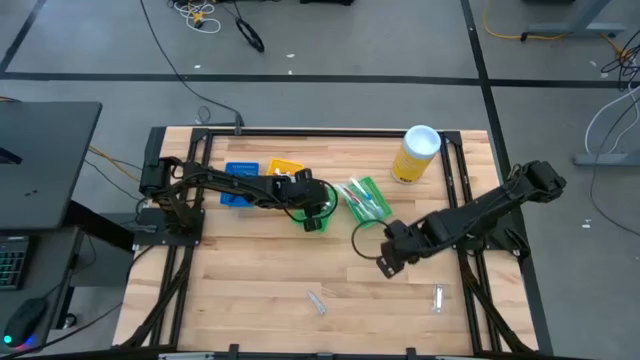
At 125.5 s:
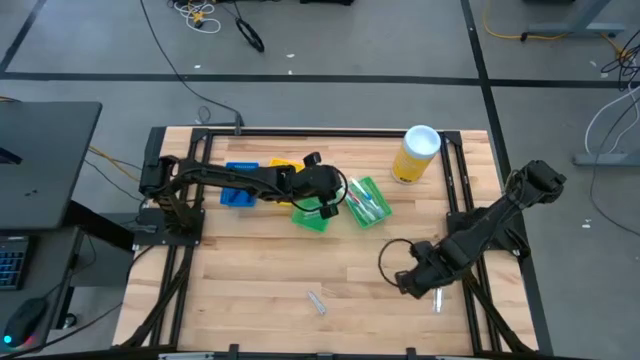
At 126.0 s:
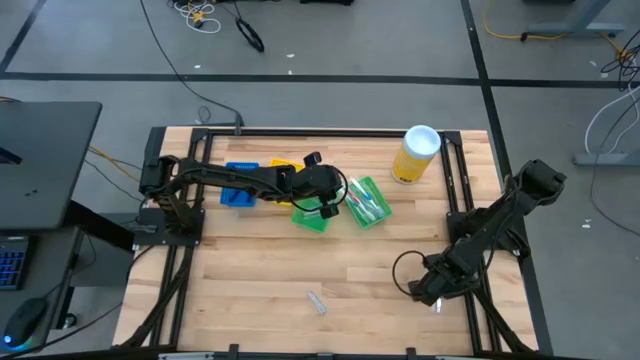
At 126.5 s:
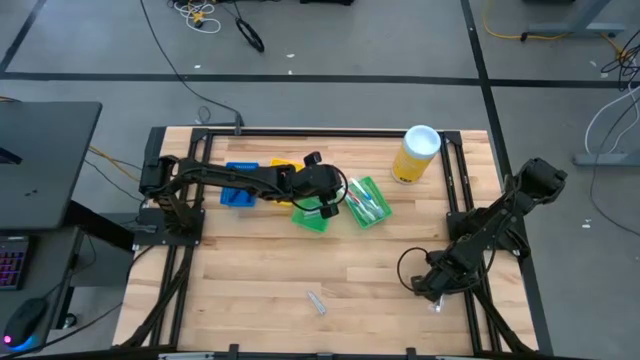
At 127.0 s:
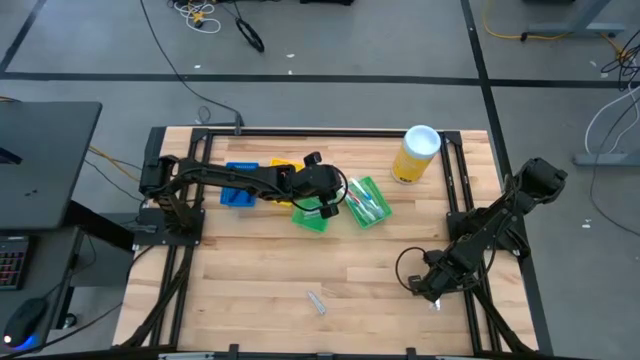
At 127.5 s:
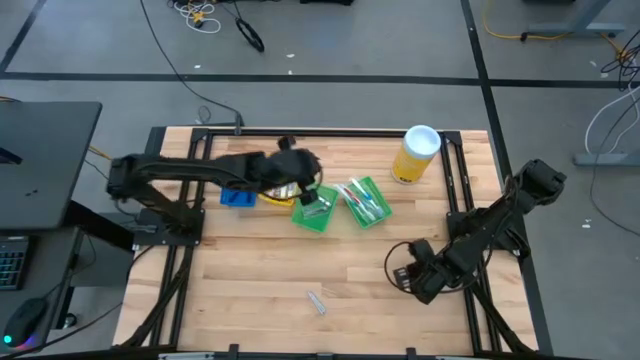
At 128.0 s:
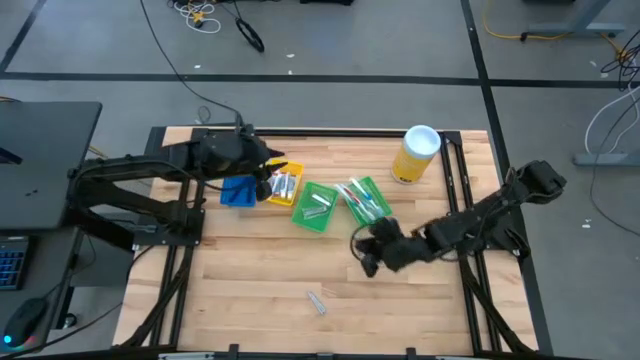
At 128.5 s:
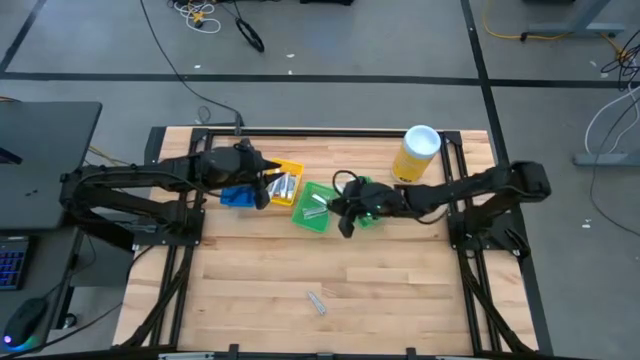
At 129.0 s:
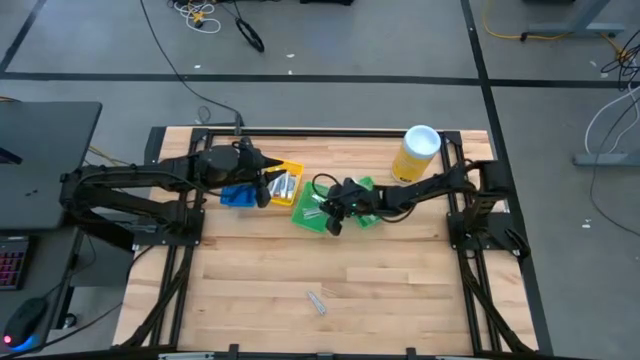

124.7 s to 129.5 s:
Task: Pick & Place Travel size toiletries
Put the silver nail cutter into the left green bin

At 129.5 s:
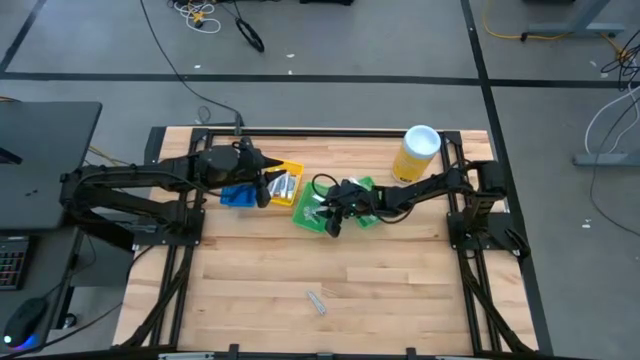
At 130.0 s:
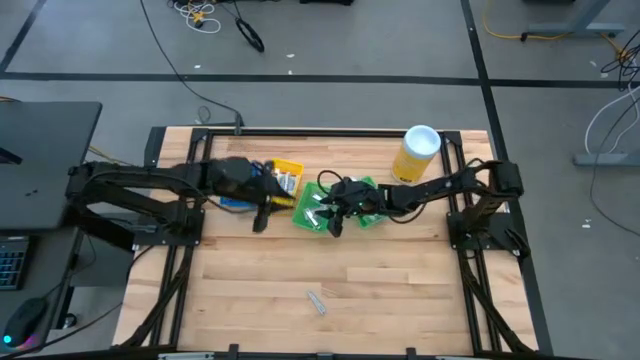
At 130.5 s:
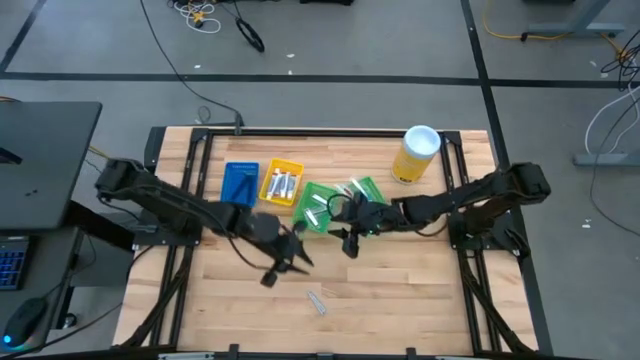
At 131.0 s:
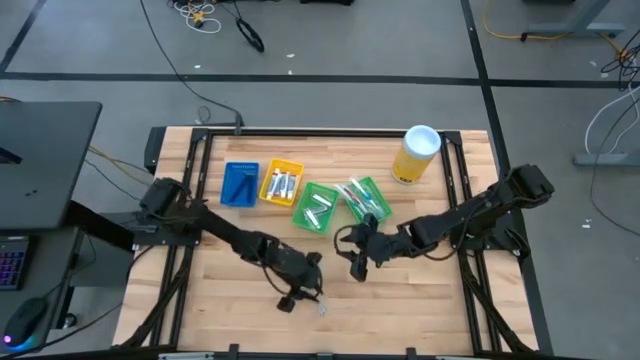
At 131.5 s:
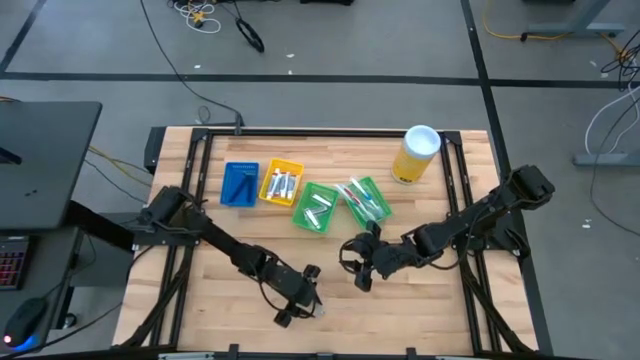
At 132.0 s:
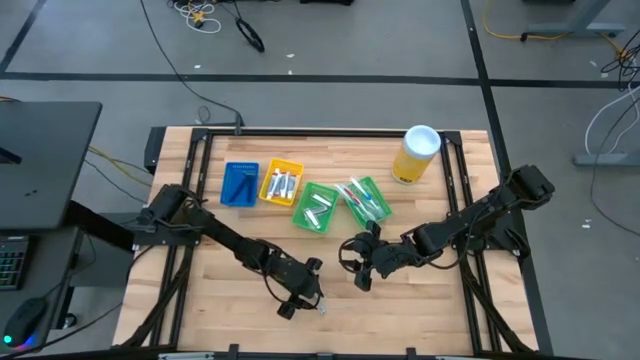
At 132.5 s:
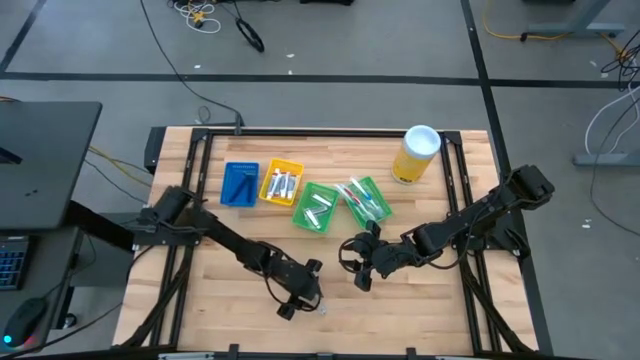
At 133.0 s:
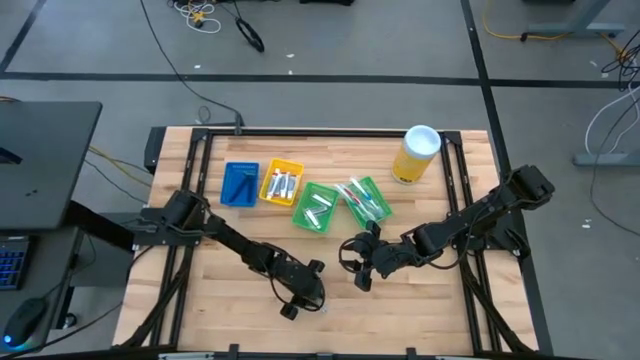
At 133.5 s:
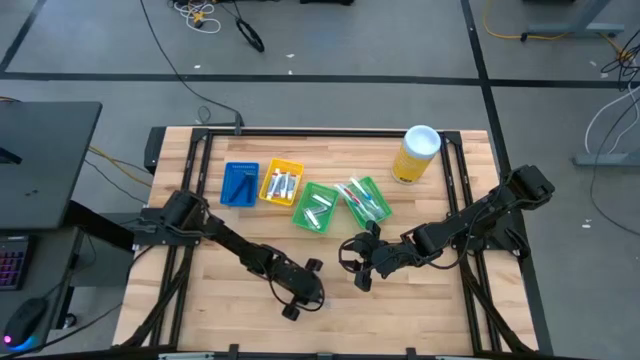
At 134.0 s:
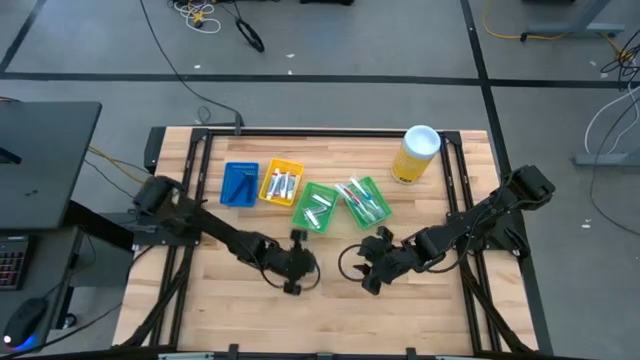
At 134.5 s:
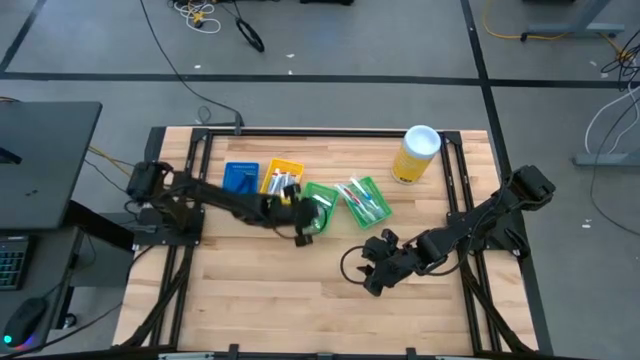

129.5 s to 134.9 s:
Put the silver nail cutter into the left green bin

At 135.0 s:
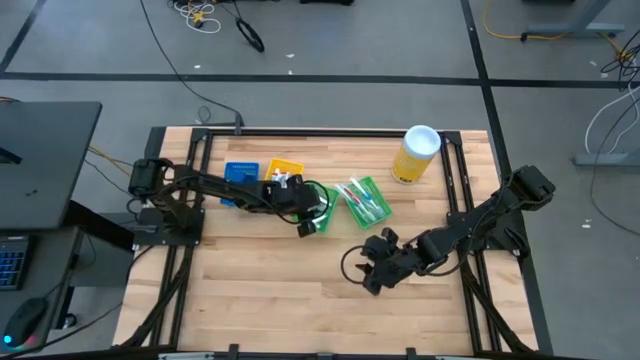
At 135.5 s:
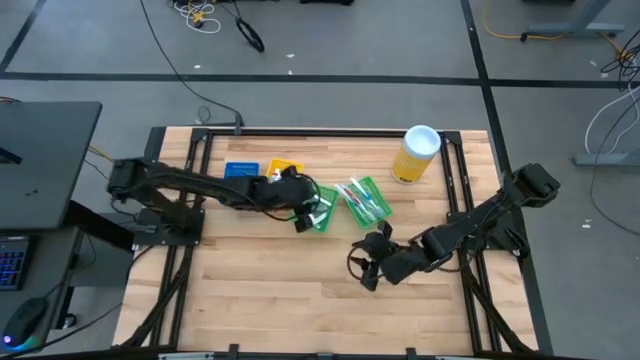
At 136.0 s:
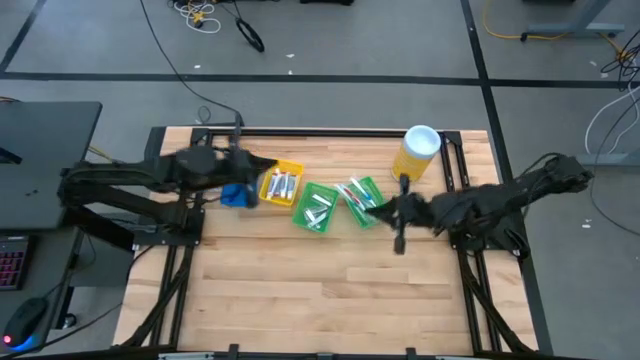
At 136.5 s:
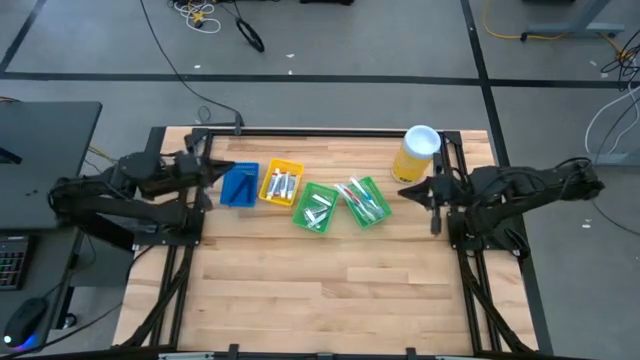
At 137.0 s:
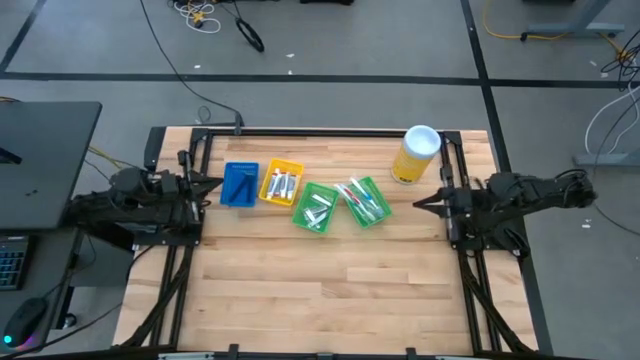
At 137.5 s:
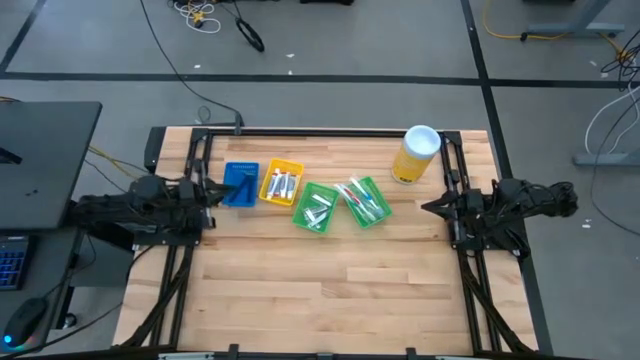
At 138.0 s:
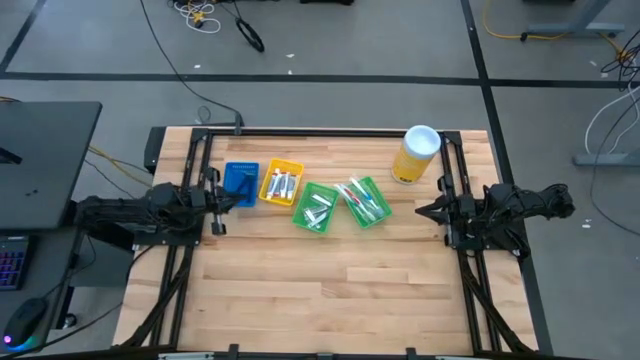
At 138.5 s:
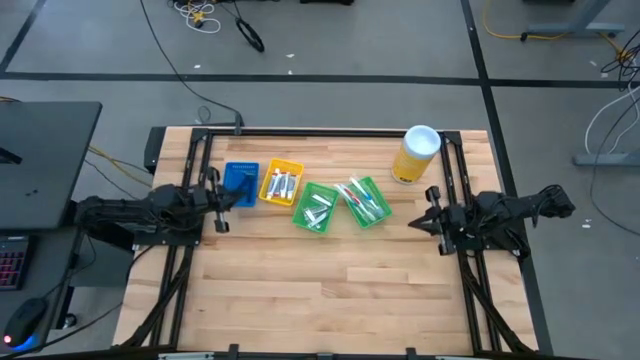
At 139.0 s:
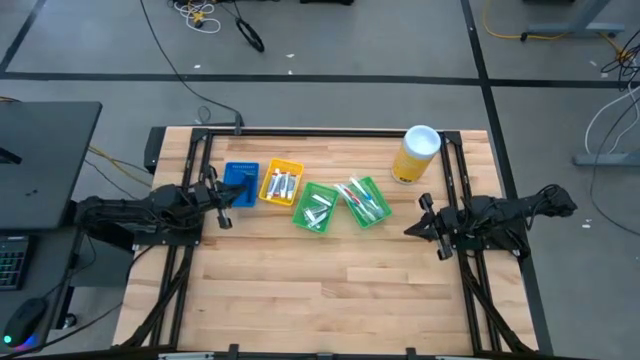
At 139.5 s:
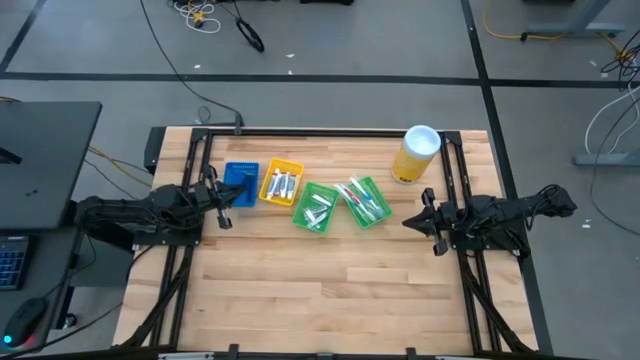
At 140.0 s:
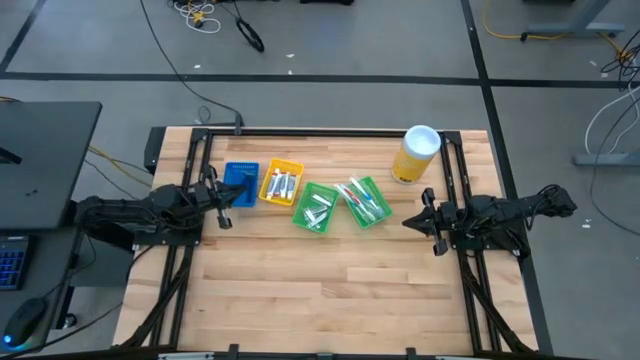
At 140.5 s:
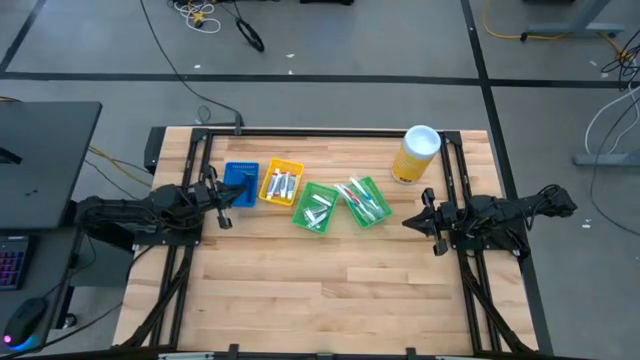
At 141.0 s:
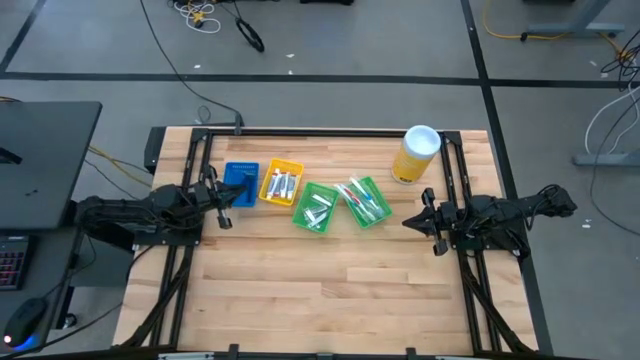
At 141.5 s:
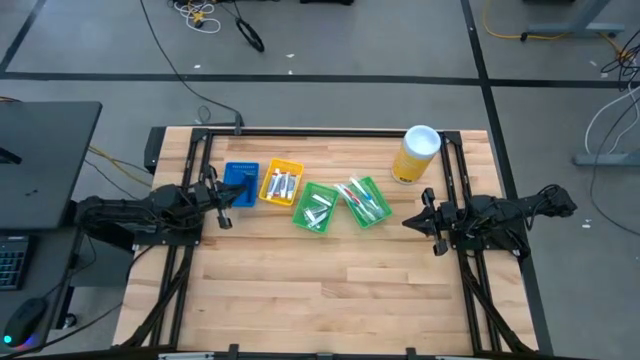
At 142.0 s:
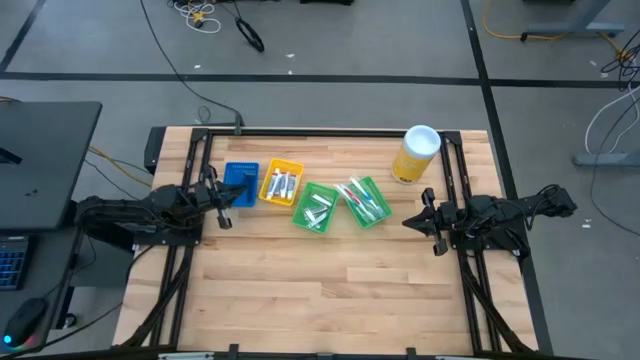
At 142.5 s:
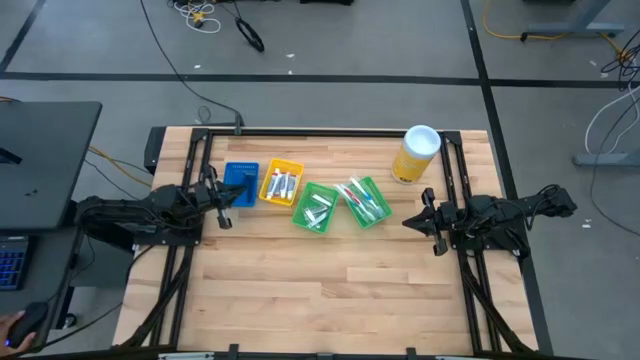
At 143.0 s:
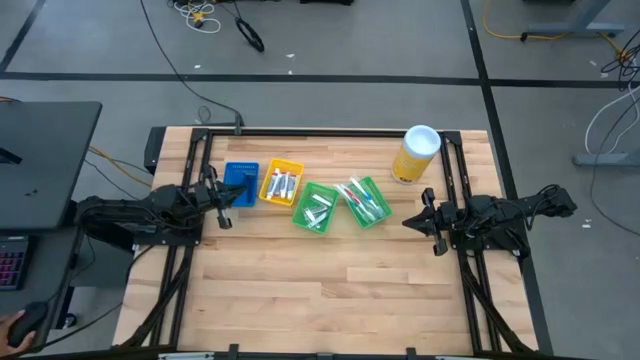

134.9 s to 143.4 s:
Return to Home Position

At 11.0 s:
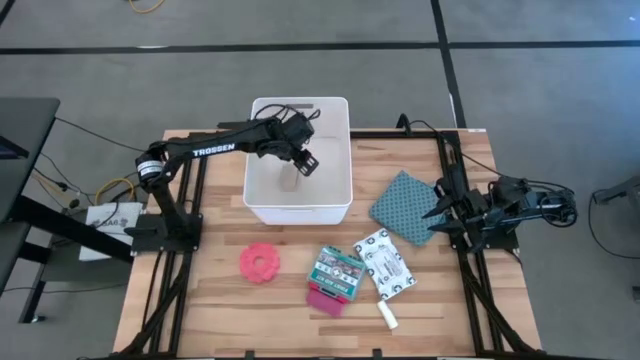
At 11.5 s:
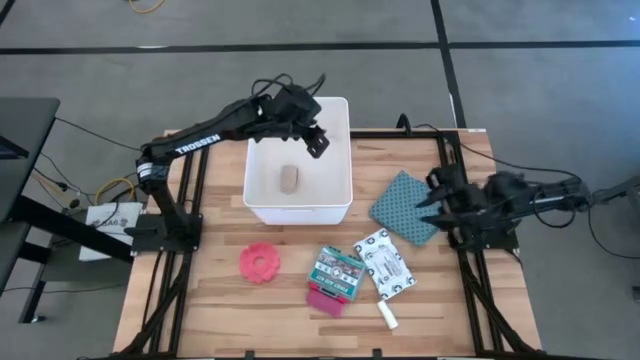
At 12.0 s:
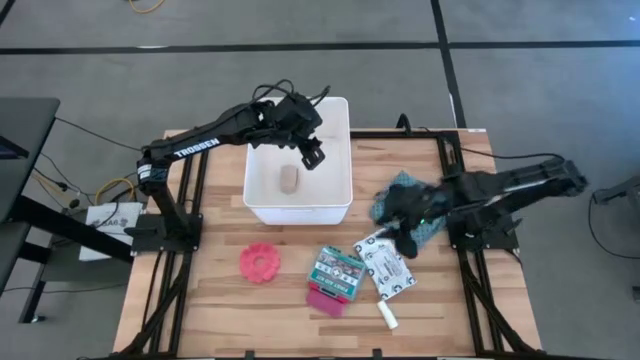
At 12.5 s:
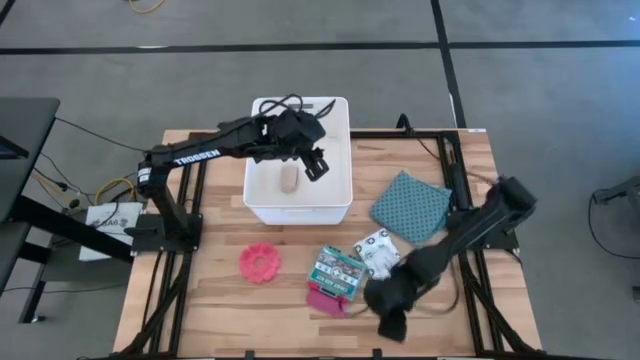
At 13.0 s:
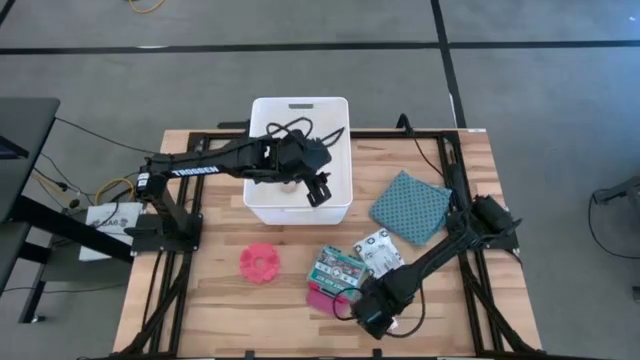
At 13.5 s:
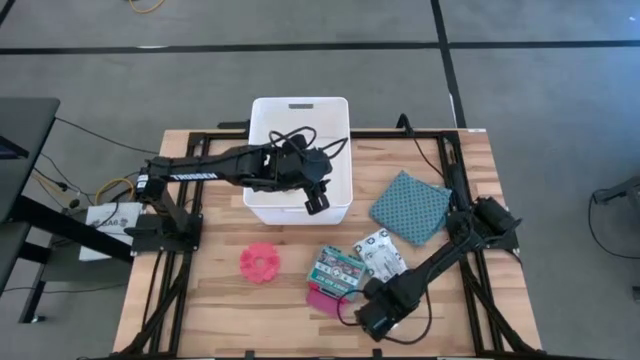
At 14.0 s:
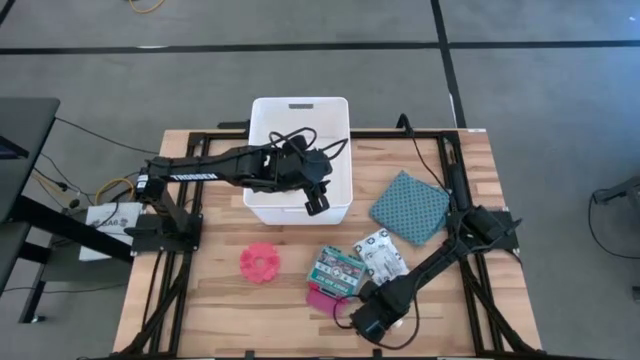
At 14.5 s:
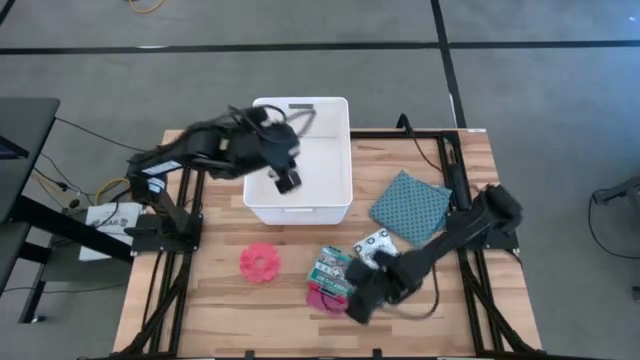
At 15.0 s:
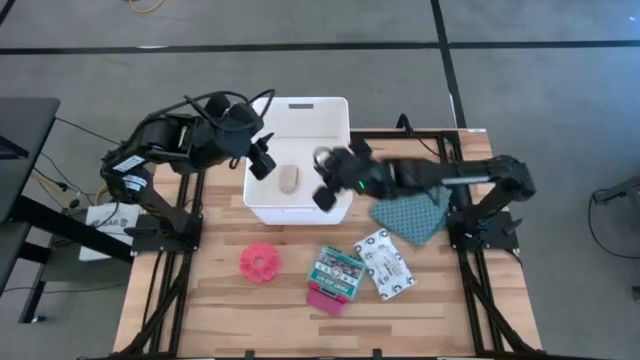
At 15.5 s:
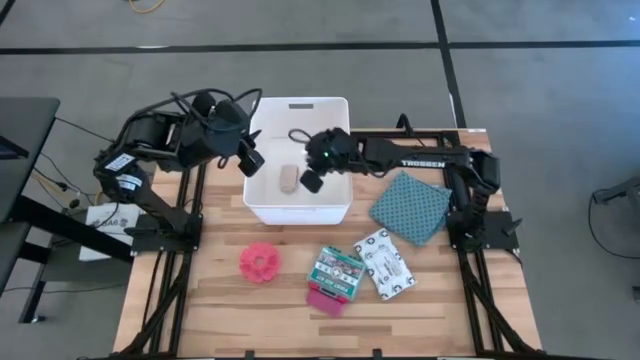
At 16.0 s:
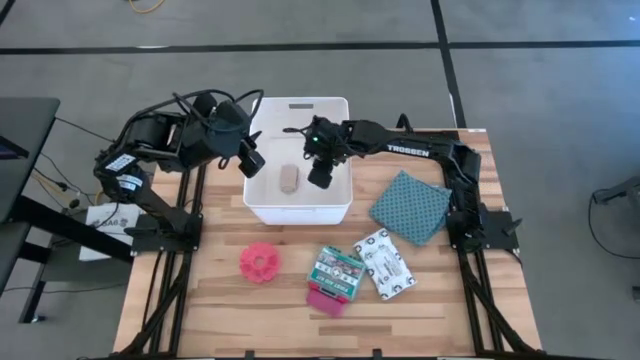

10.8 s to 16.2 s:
Task: Pick & place medical supplies in basket/bin
Put the white rolled gauze into the white bin
